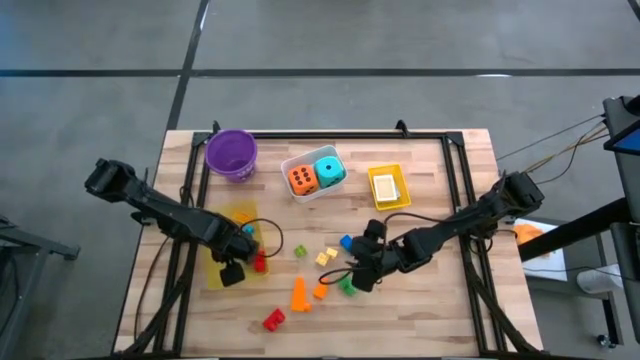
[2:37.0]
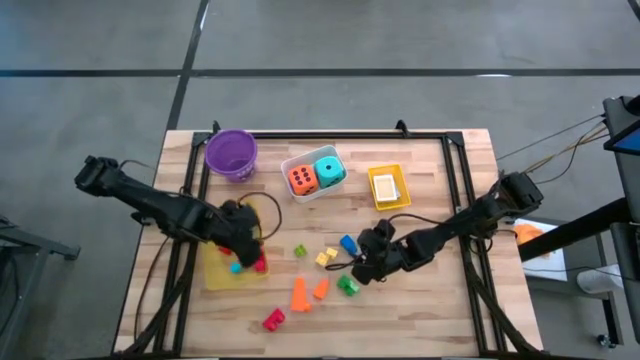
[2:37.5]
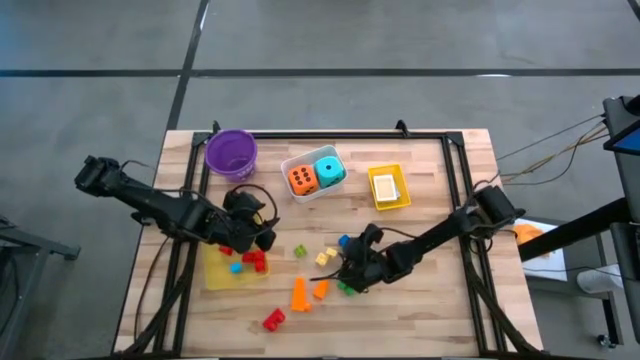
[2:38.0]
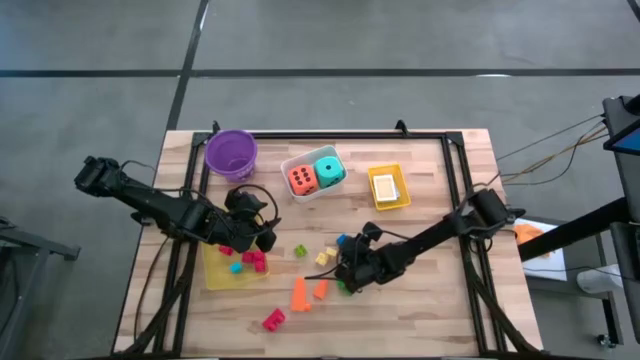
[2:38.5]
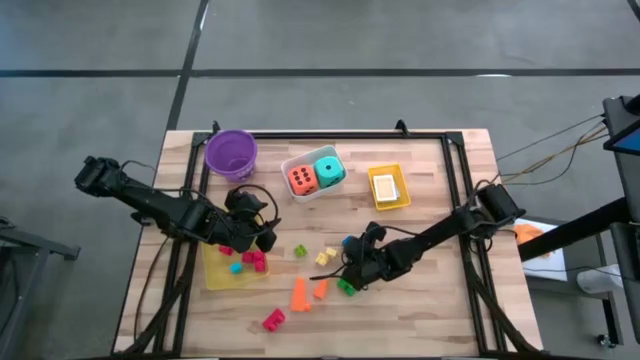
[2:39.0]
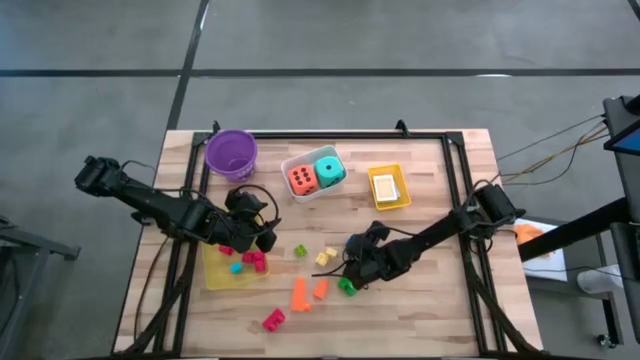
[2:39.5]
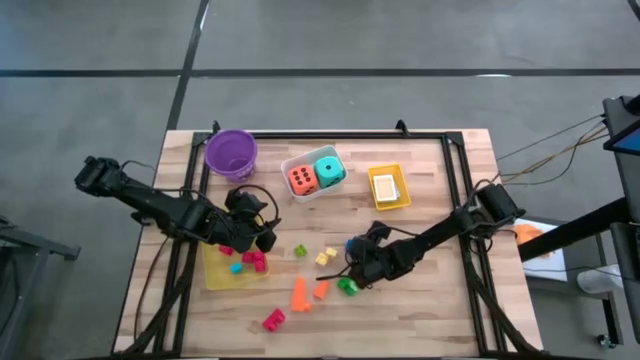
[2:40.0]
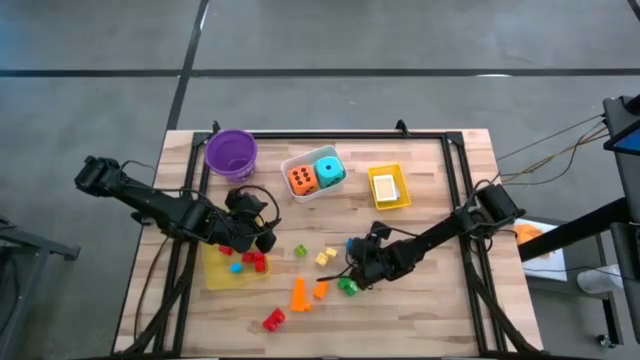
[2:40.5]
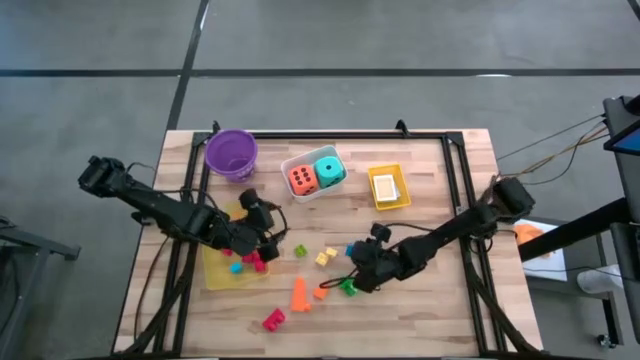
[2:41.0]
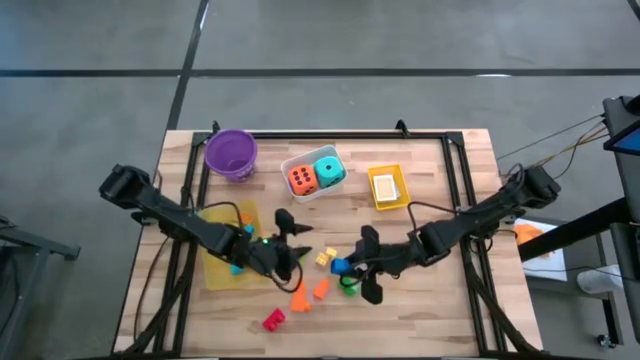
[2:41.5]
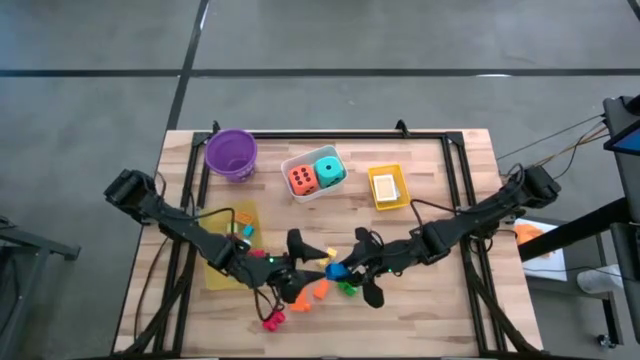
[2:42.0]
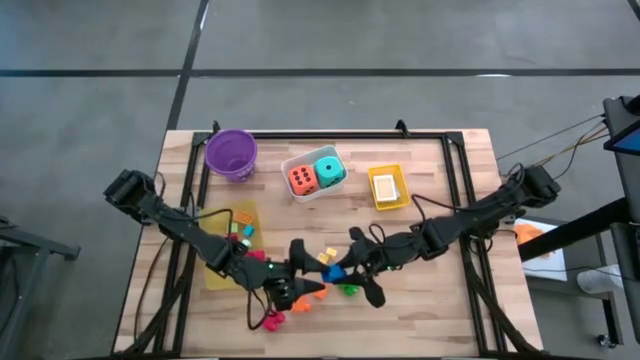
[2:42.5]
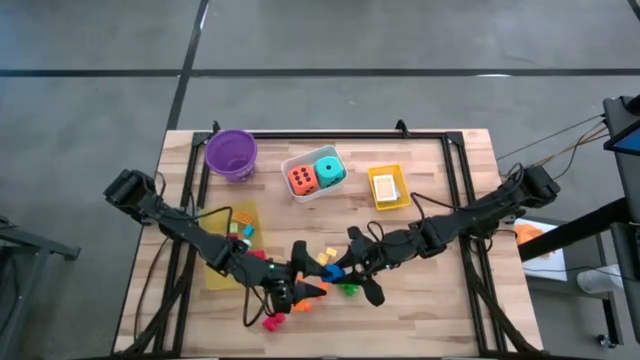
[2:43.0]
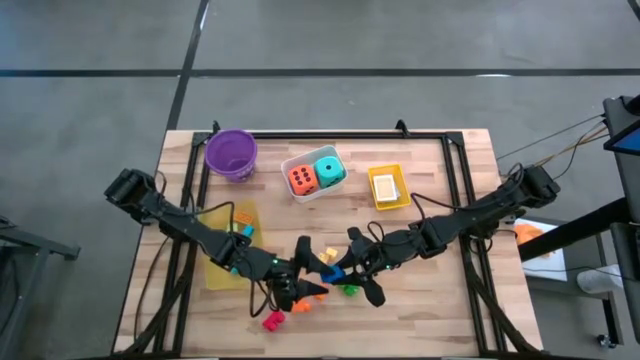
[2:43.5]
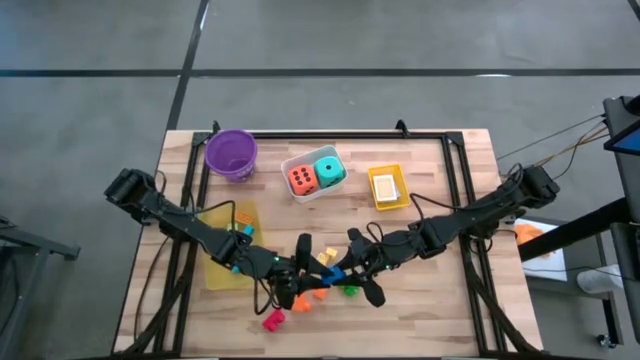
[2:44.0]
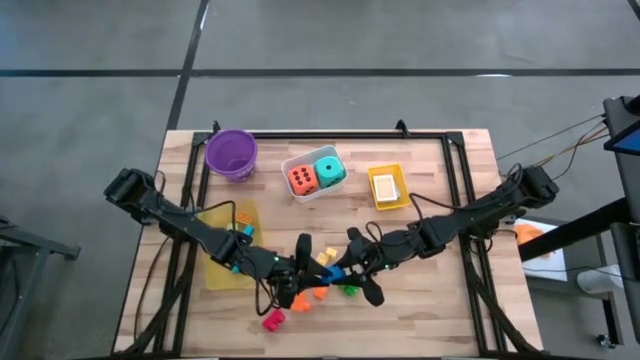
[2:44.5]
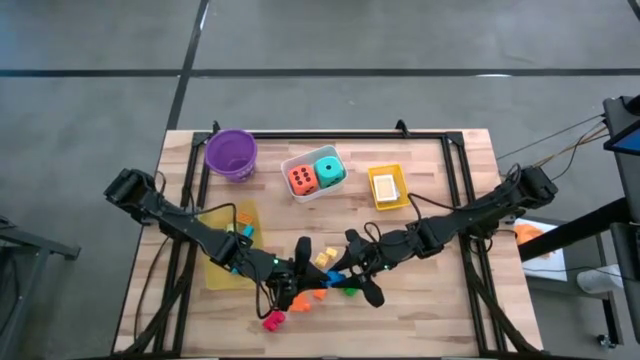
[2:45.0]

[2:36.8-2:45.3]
Task: Pick & Place Toys
Put the blue game piece into the light yellow bin

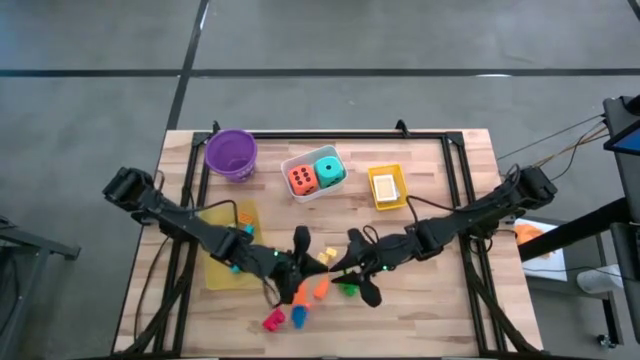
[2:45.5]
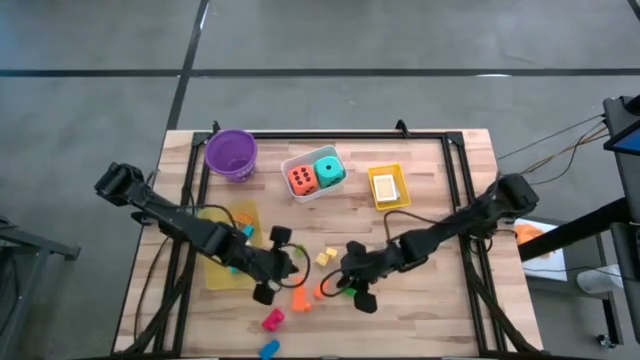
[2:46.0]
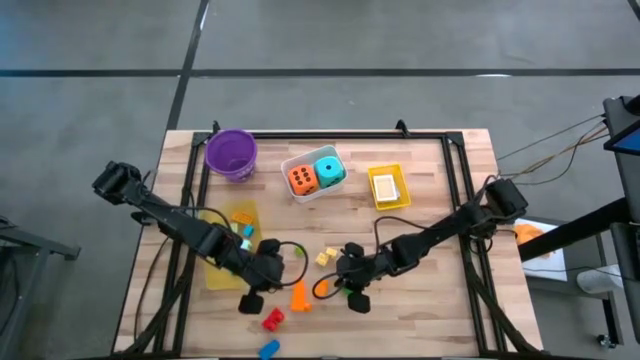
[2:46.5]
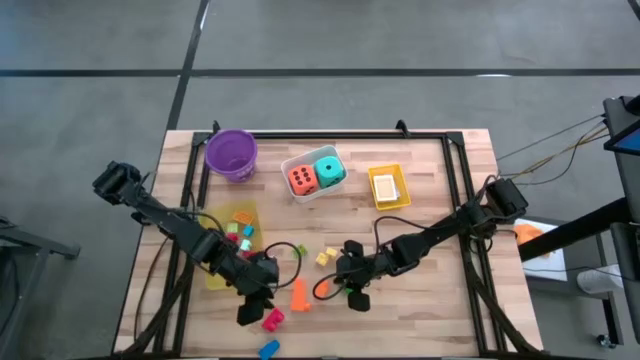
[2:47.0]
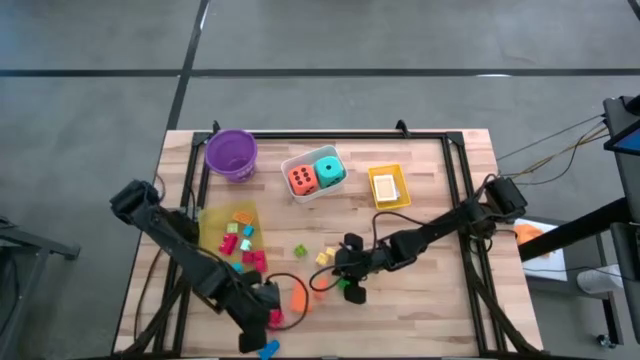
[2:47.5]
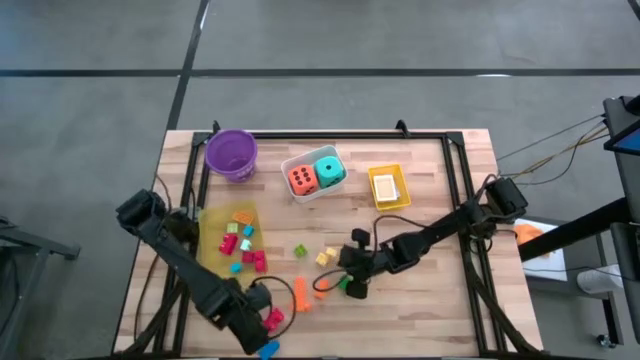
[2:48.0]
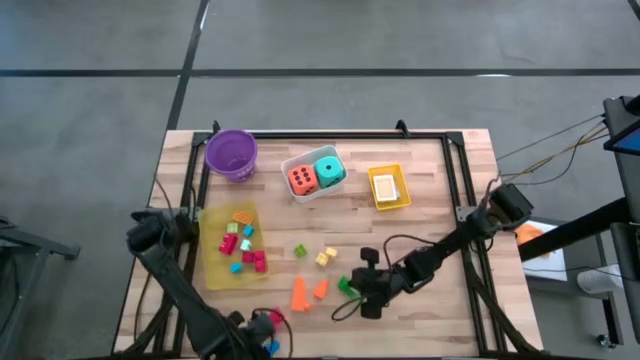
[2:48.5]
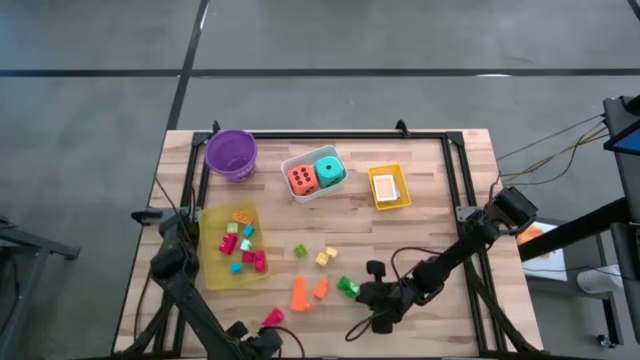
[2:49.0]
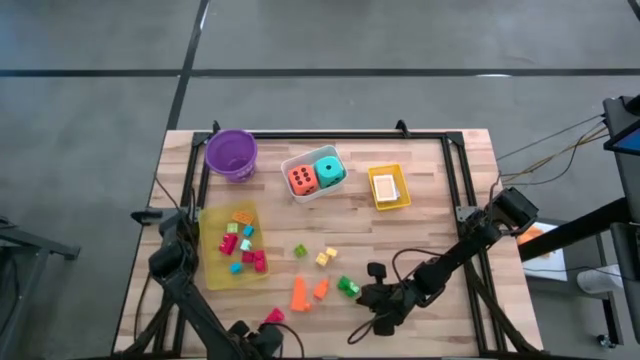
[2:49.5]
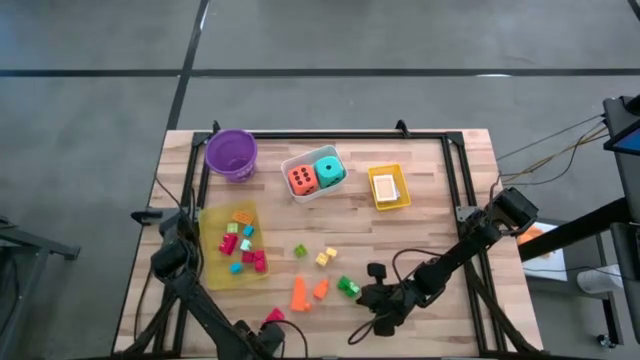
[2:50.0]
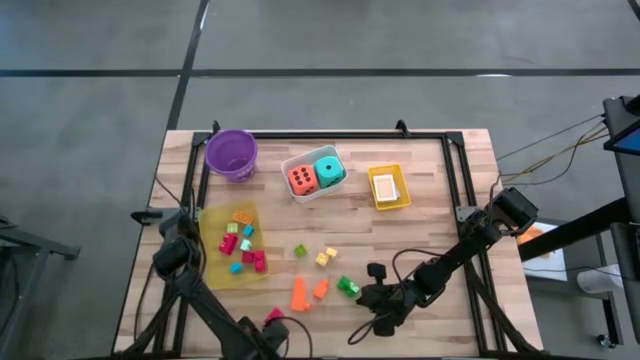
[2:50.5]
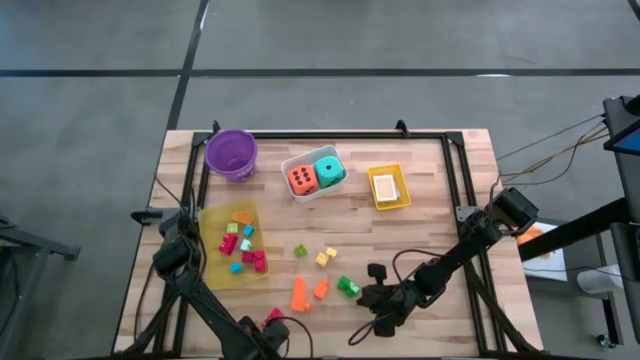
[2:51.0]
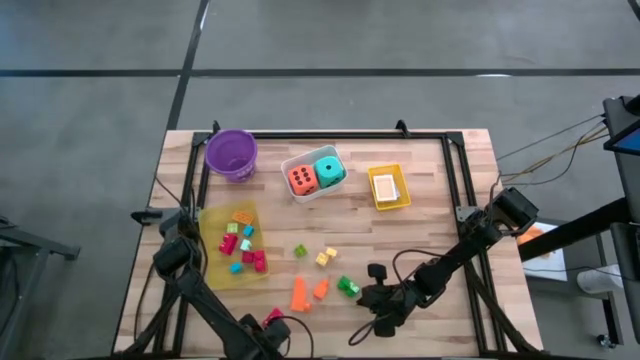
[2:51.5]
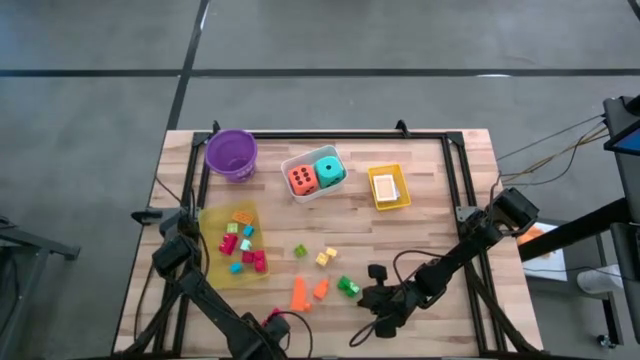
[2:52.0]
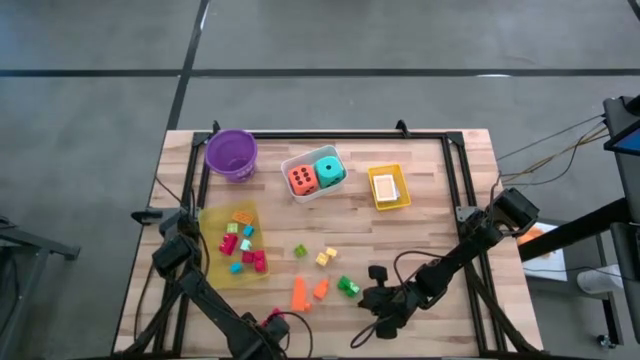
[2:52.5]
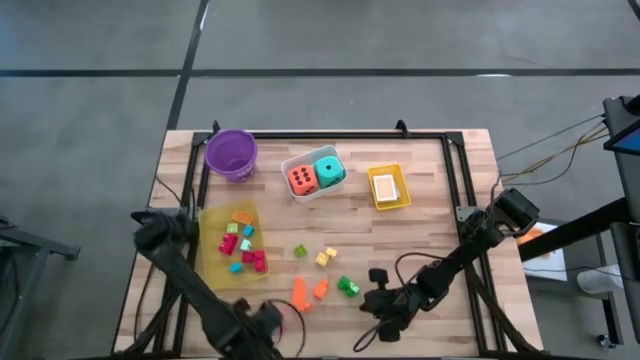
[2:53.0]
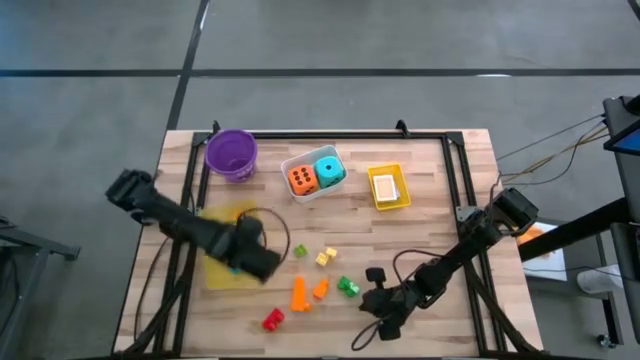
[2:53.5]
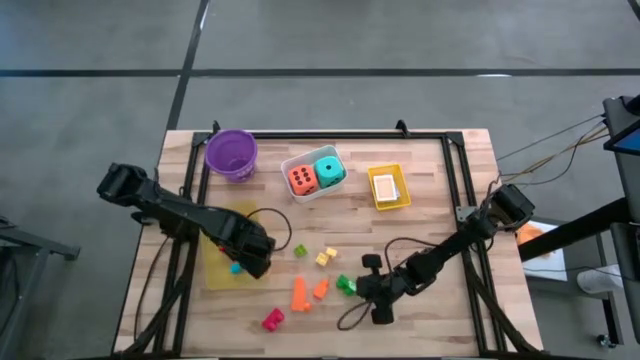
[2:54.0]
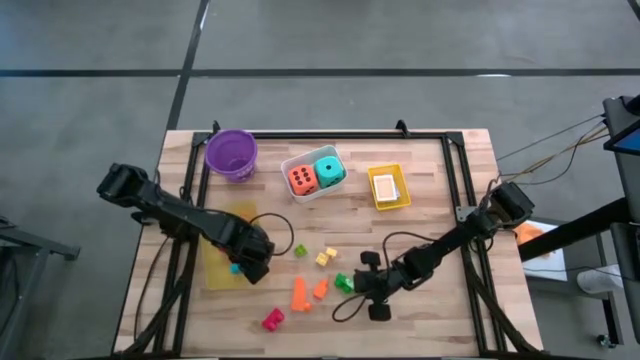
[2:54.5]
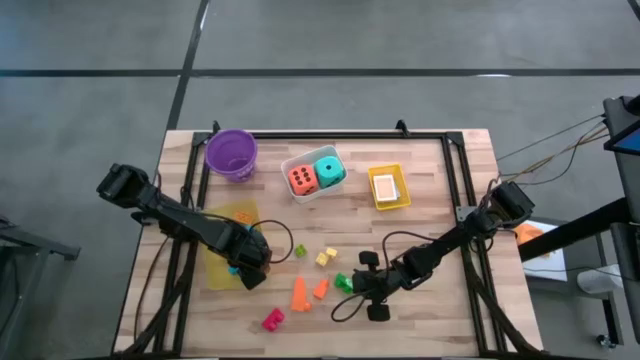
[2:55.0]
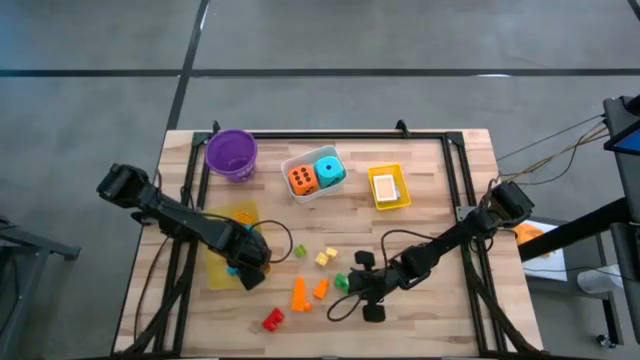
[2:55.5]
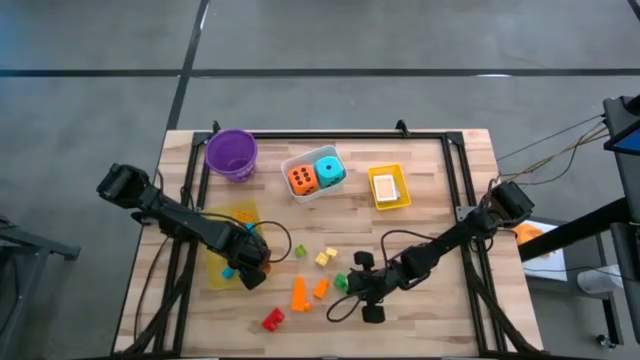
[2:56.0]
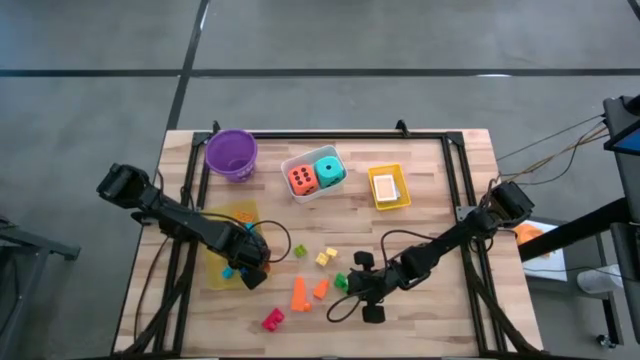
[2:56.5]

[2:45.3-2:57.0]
Put the blue game piece into the light yellow bin

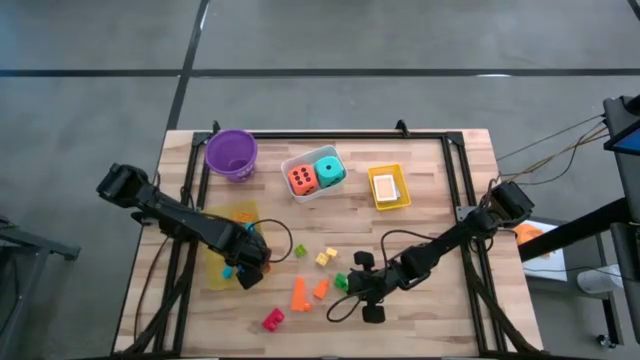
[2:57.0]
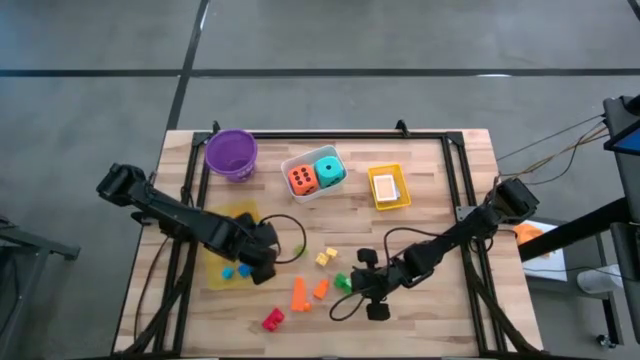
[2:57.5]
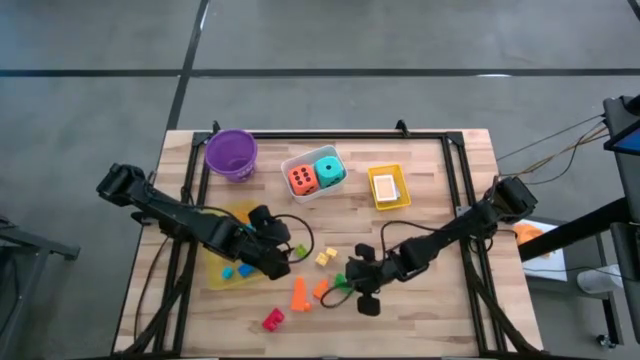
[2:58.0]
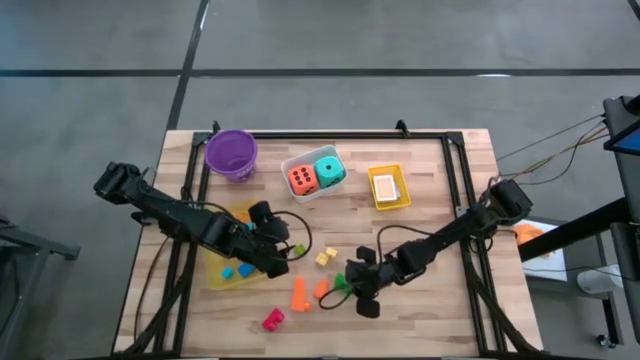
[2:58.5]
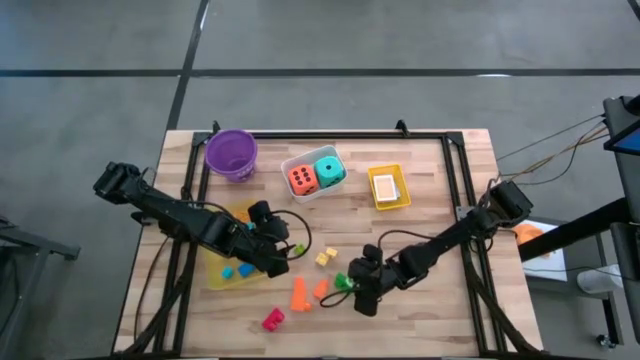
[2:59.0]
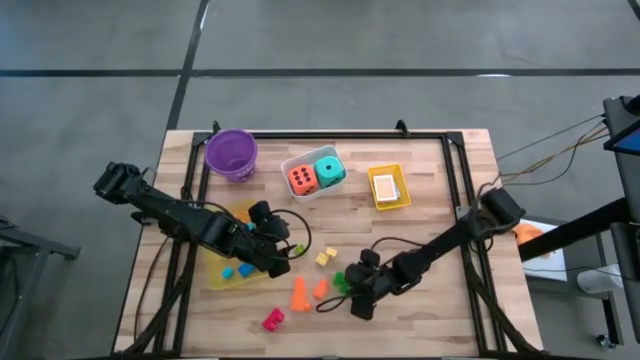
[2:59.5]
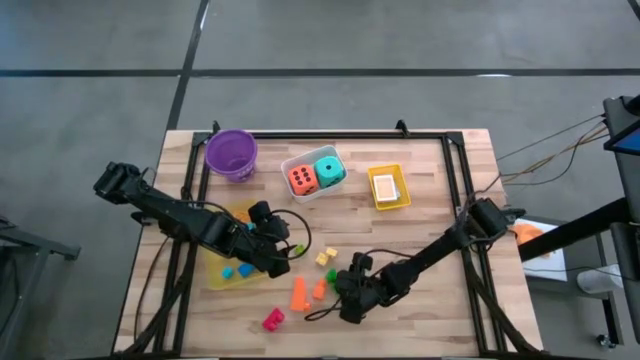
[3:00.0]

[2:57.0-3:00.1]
Put the dark green game piece into the light yellow bin
